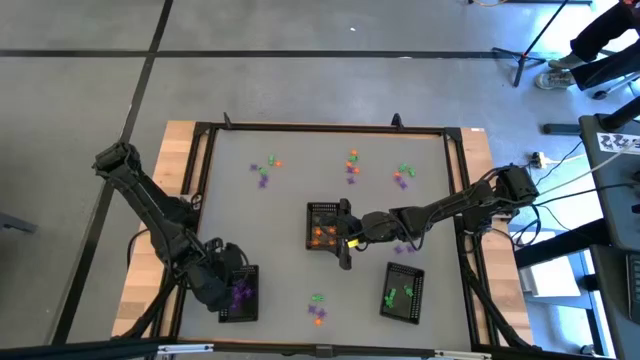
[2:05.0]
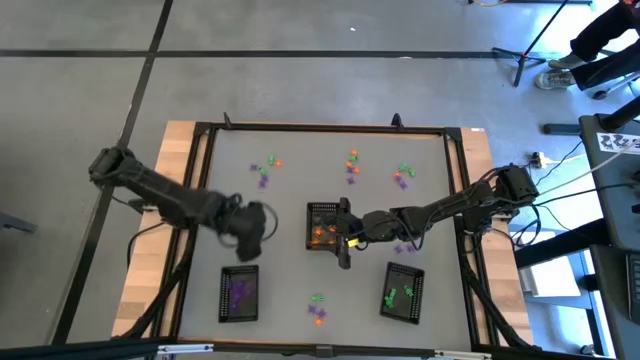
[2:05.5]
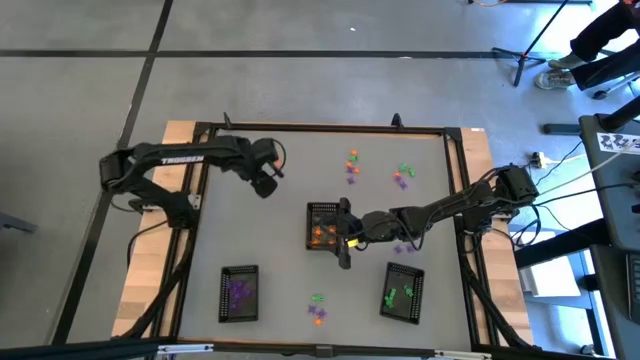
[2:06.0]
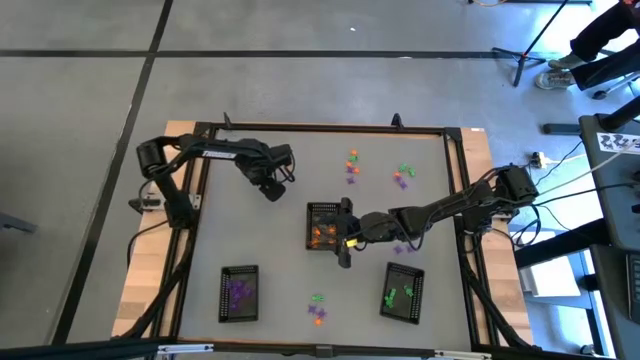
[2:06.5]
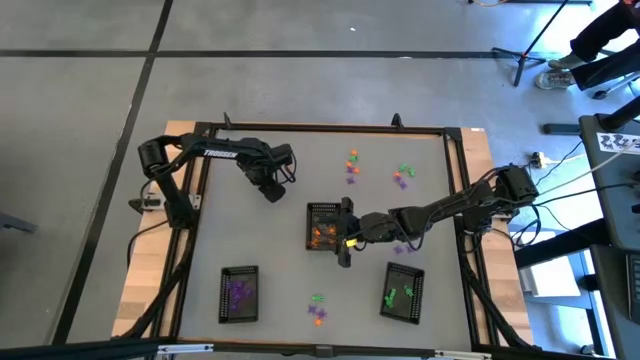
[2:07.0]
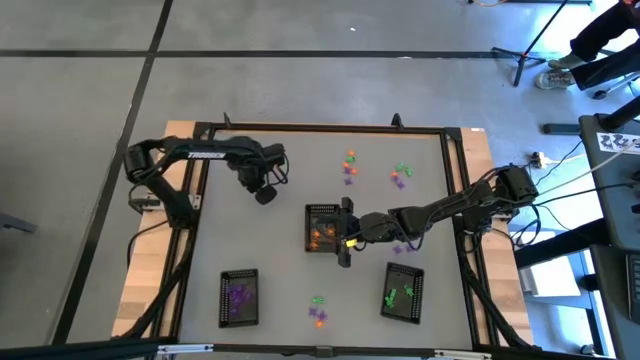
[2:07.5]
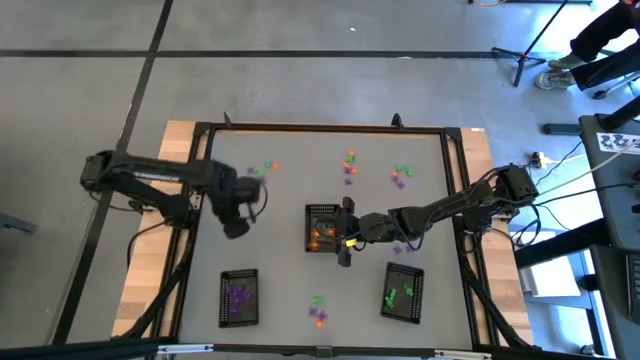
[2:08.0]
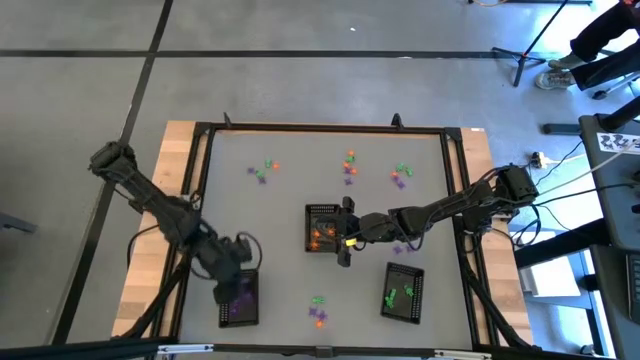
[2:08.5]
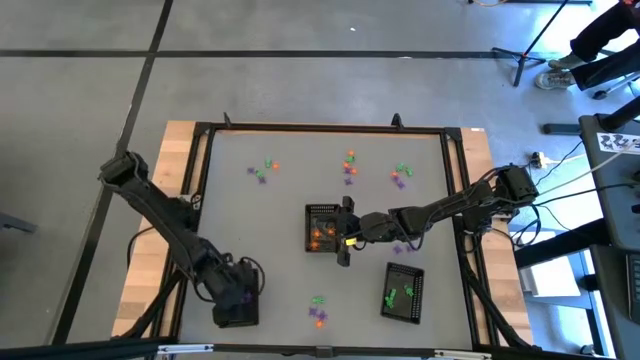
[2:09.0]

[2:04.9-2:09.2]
Task: Sort Halloween decoration
Put the violet spider toy into the bottom left black bin

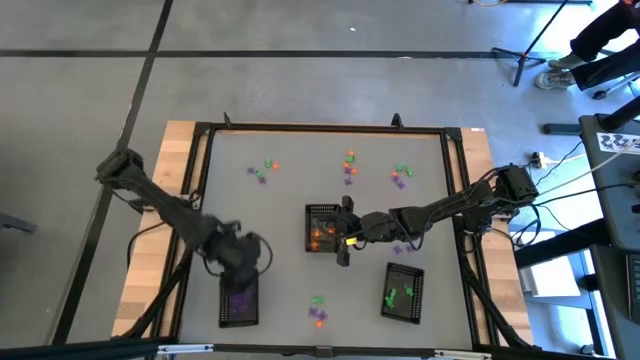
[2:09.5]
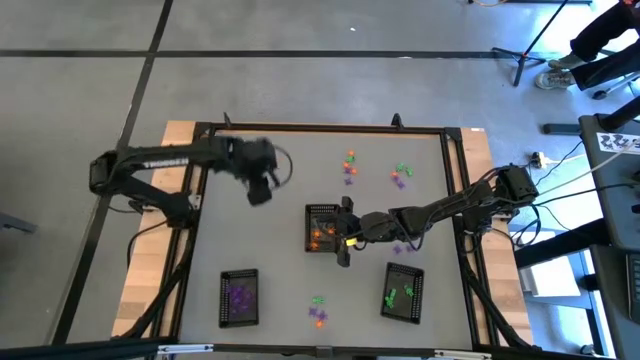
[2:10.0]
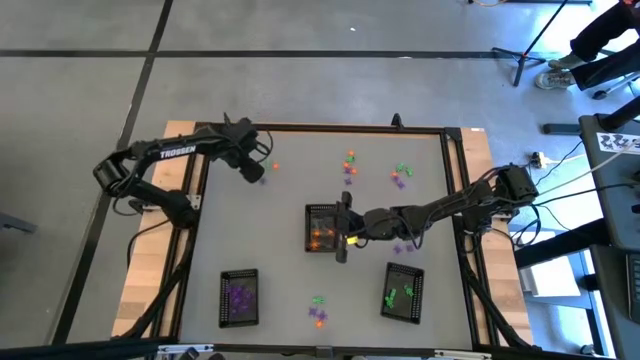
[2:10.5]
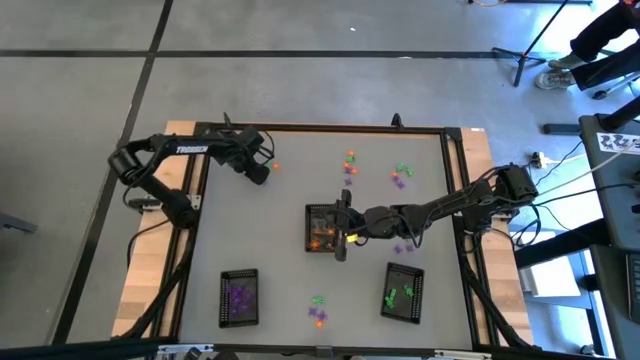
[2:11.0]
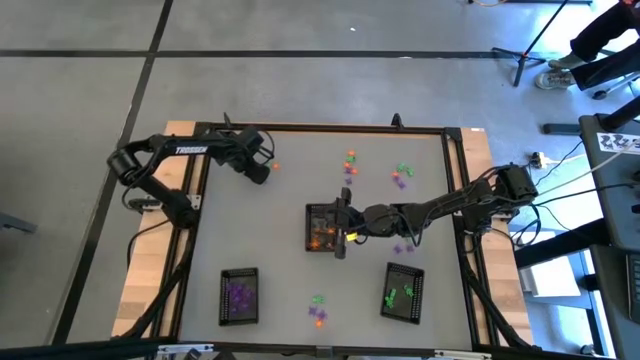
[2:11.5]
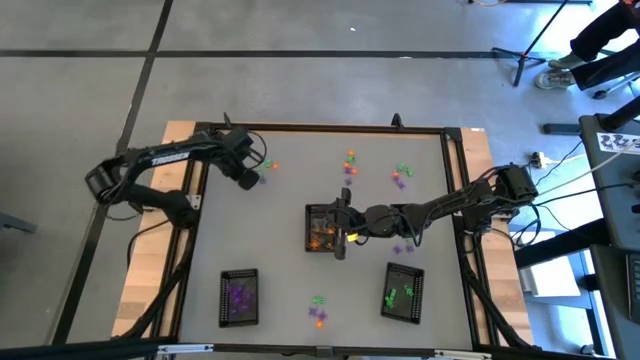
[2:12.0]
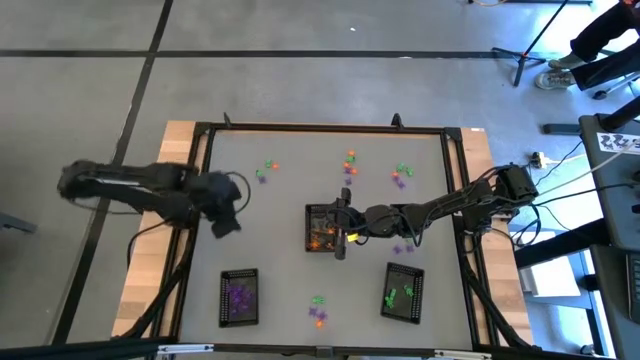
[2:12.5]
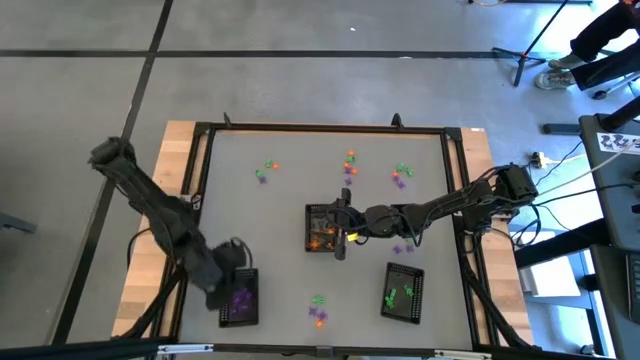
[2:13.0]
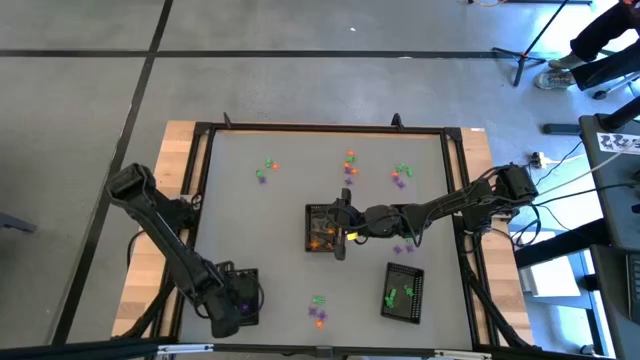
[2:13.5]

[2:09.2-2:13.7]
Put the violet spider toy into the bottom left black bin

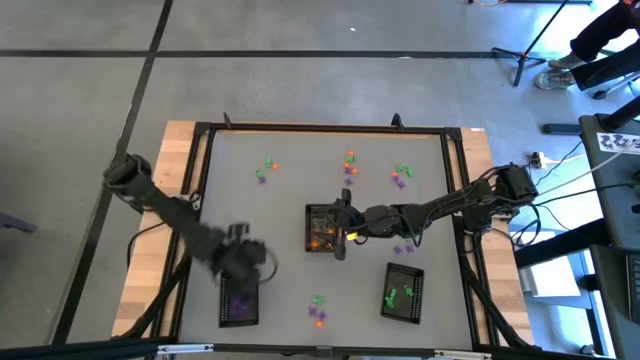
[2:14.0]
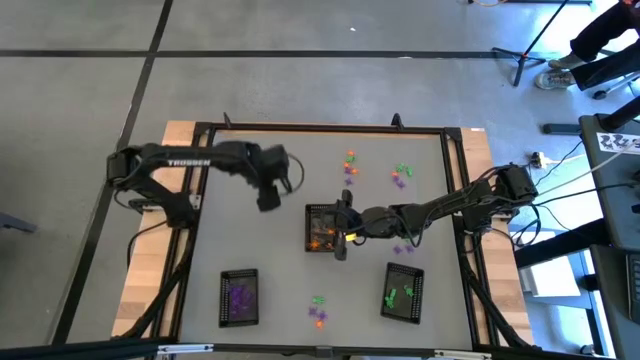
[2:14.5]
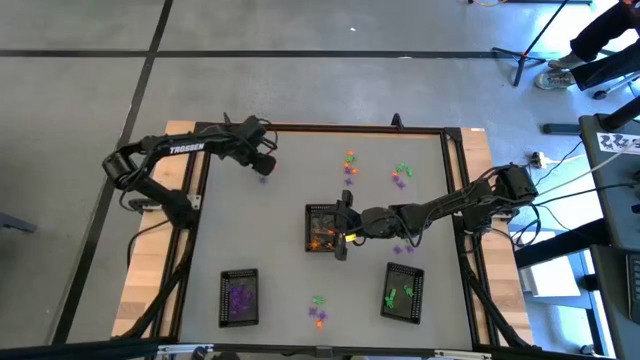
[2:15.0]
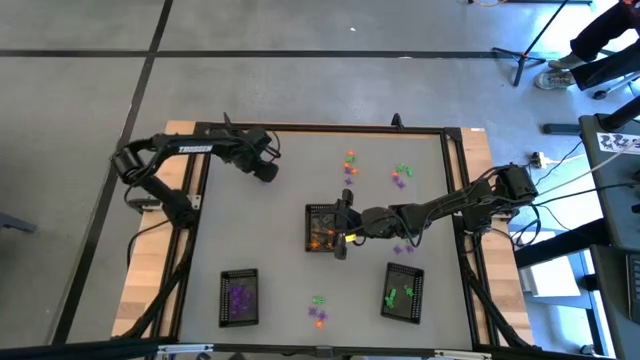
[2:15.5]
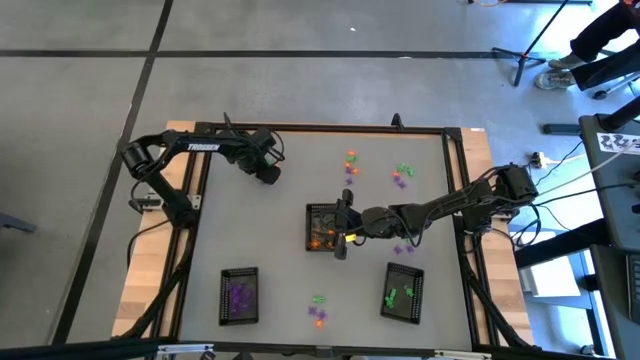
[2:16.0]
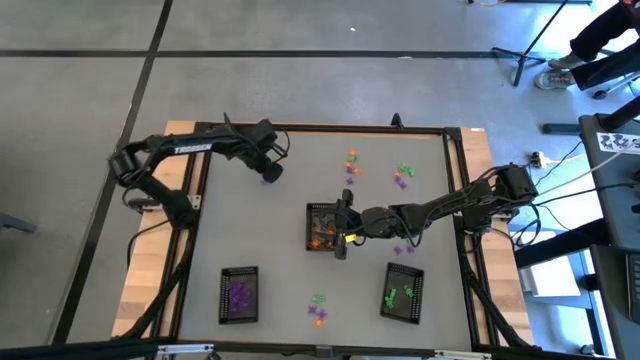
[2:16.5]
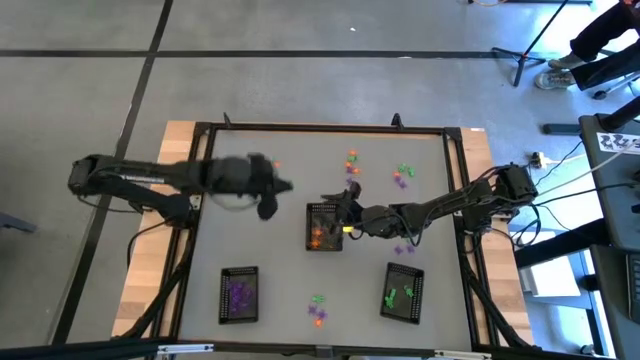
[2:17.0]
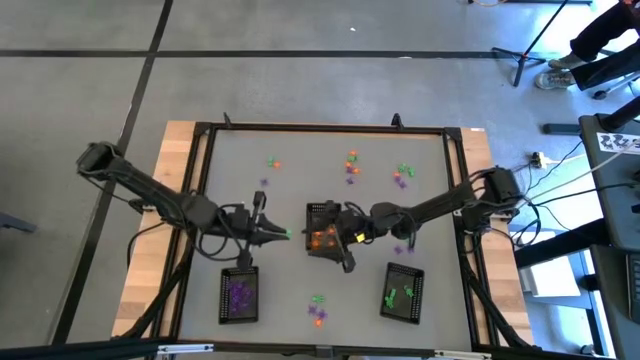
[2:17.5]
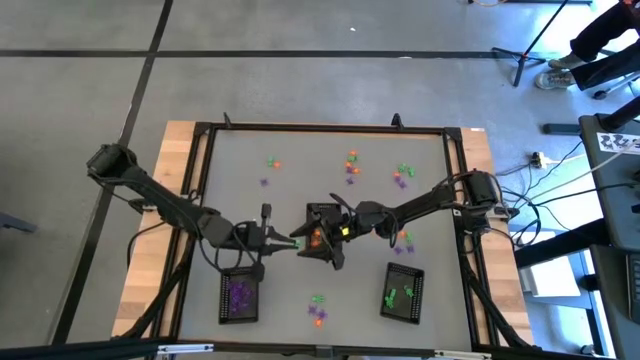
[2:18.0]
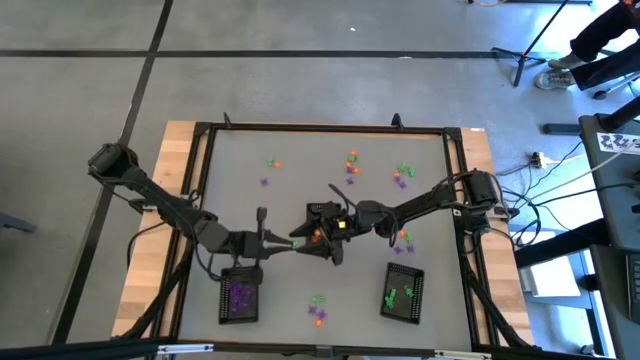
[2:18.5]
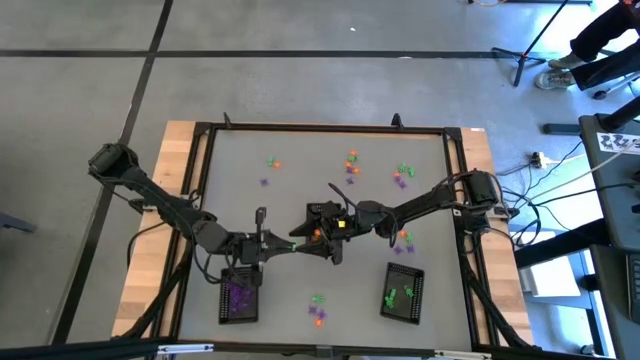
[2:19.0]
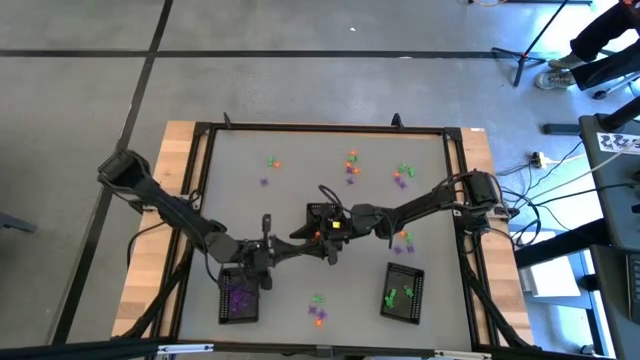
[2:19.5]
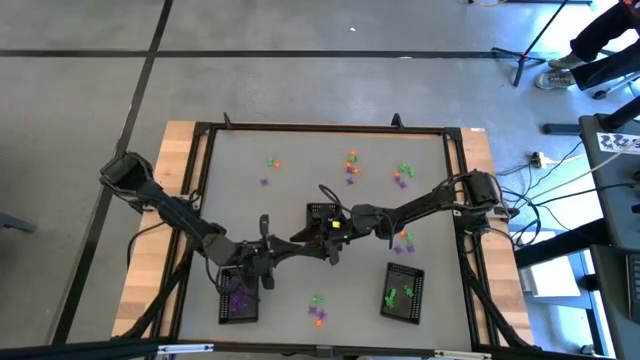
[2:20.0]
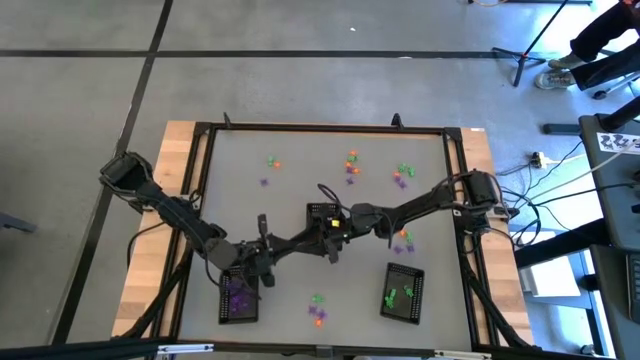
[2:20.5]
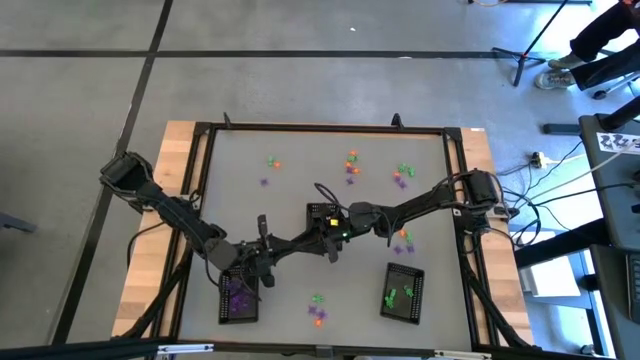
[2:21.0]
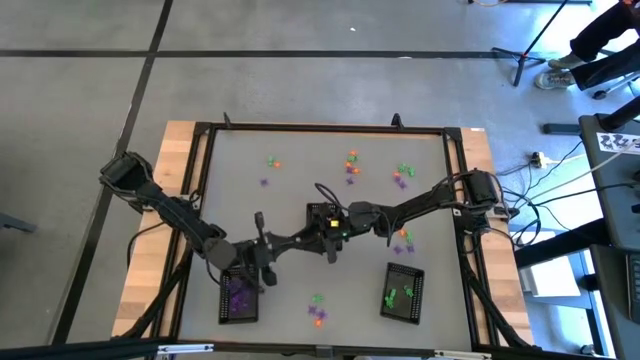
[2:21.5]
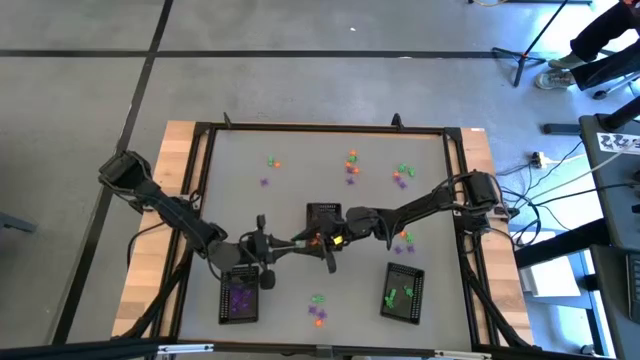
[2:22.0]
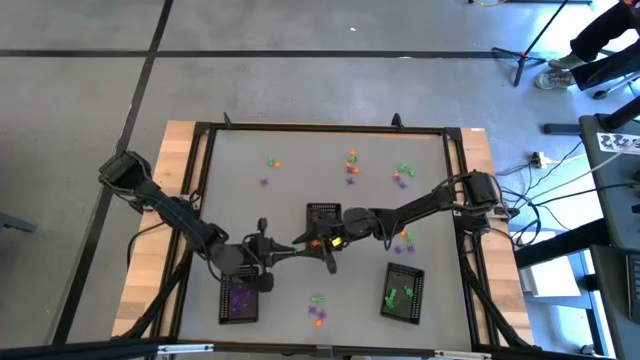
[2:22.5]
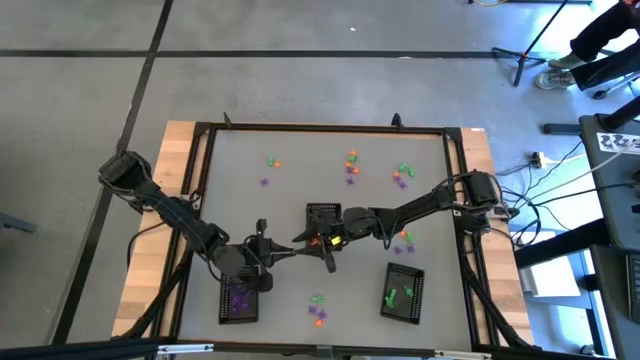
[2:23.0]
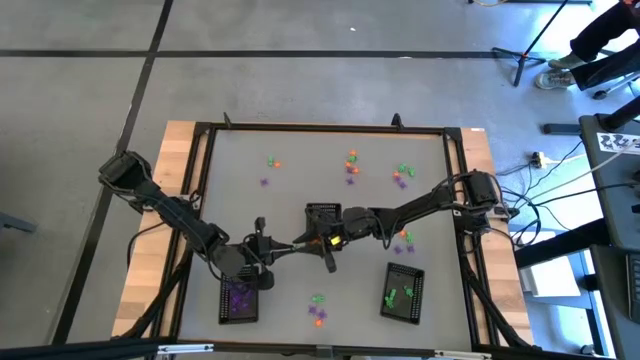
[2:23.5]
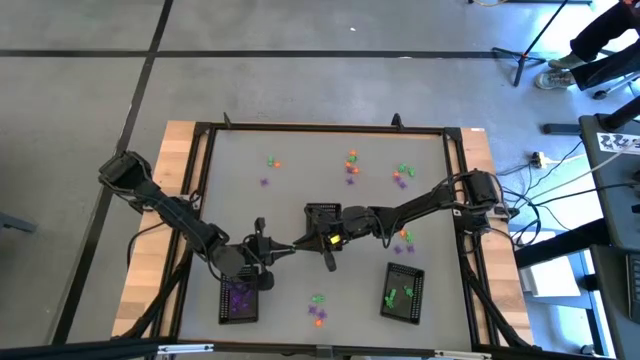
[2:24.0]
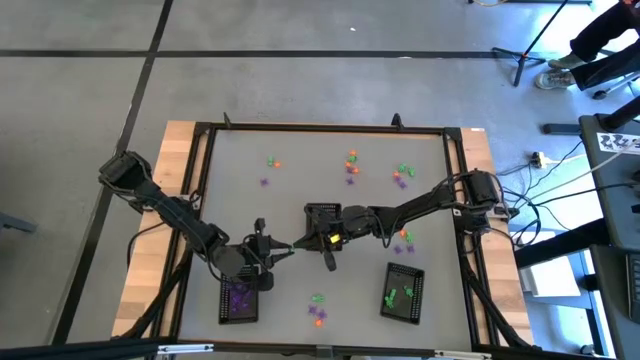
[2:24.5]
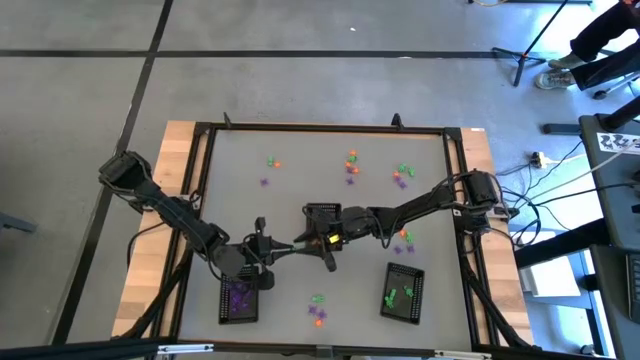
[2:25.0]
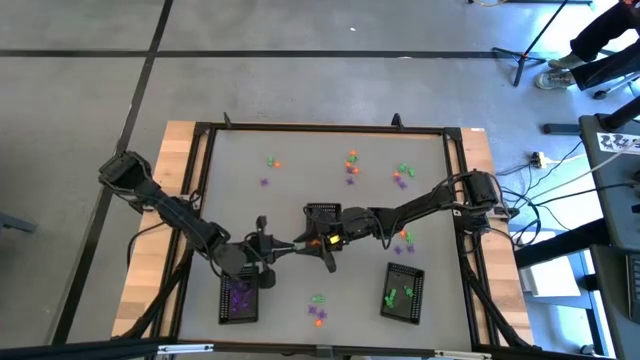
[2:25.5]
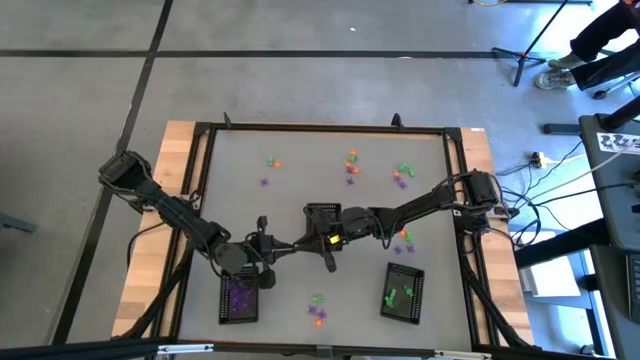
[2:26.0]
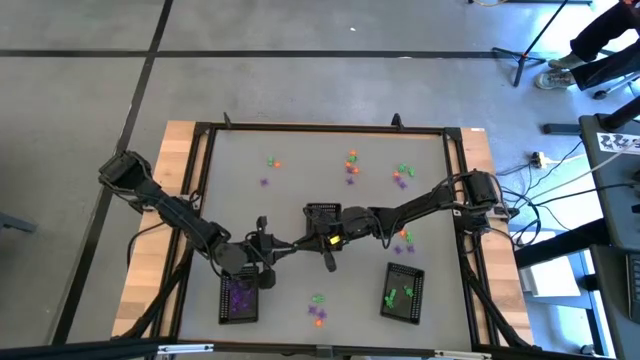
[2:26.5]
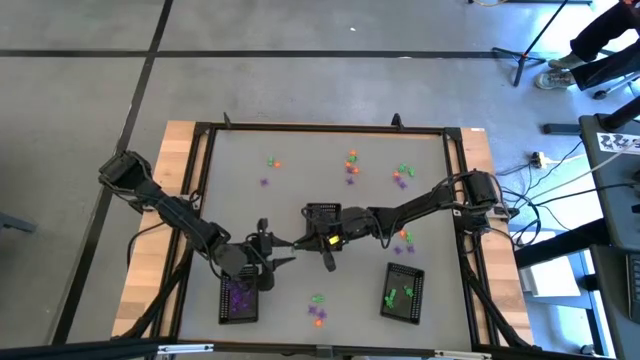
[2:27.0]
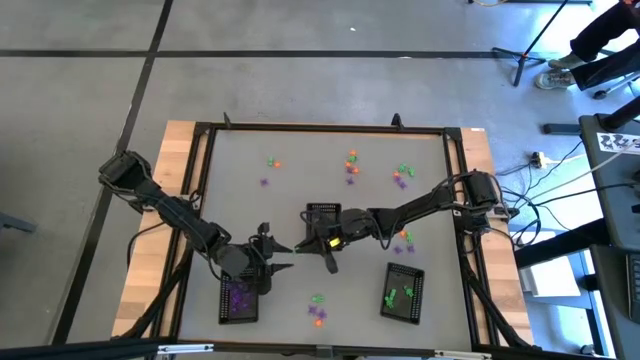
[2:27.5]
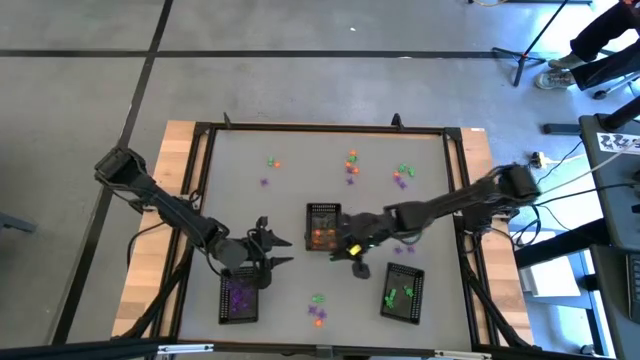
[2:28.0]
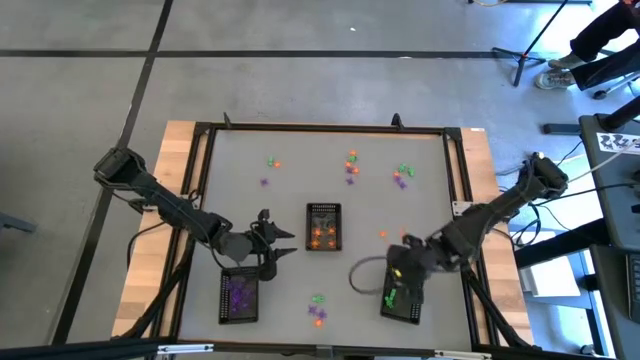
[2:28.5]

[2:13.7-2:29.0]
Put the green skeleton toy into the bottom right black bin
